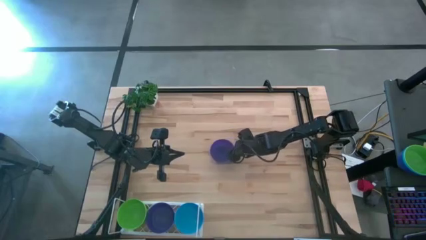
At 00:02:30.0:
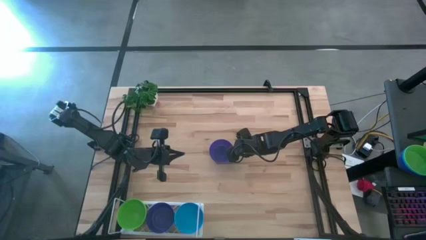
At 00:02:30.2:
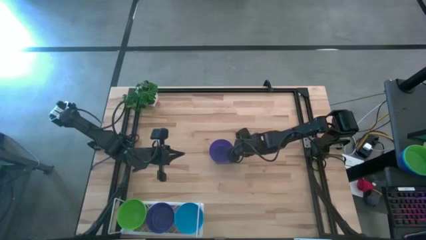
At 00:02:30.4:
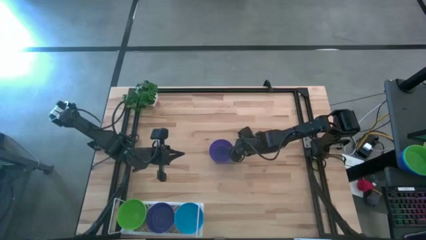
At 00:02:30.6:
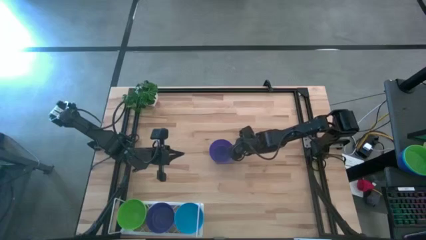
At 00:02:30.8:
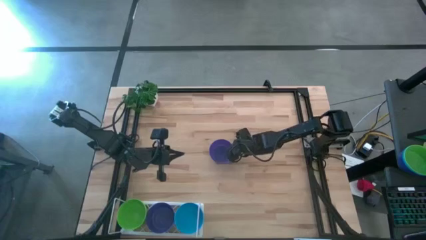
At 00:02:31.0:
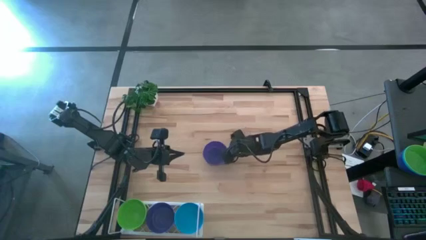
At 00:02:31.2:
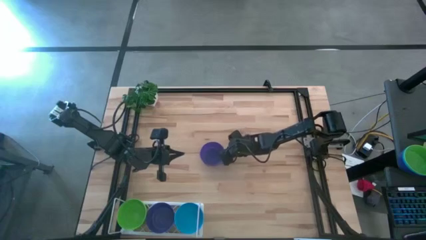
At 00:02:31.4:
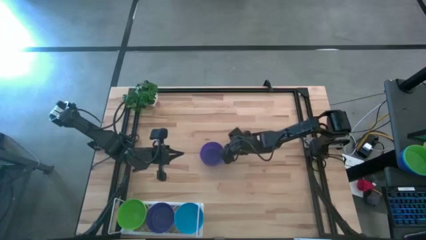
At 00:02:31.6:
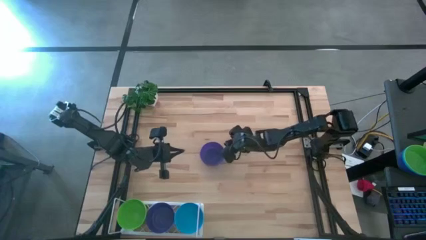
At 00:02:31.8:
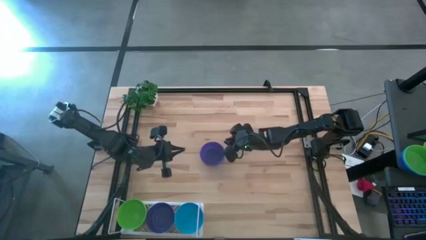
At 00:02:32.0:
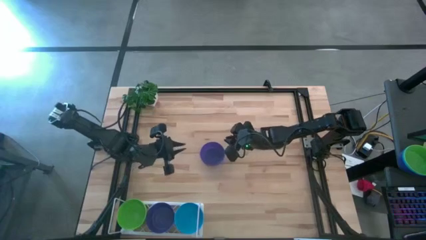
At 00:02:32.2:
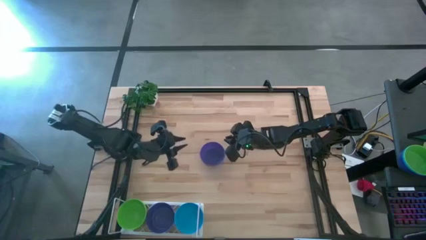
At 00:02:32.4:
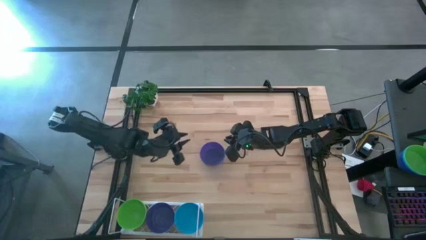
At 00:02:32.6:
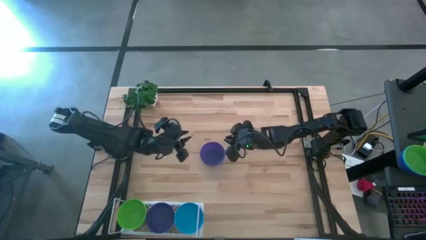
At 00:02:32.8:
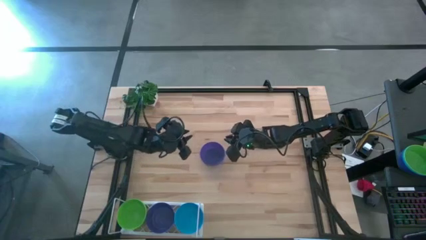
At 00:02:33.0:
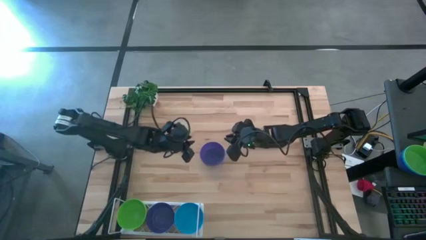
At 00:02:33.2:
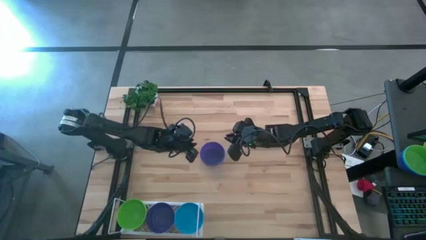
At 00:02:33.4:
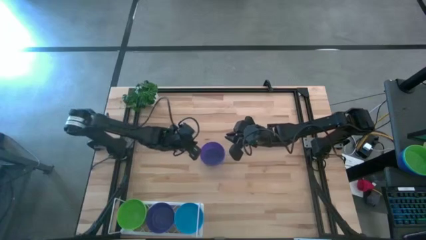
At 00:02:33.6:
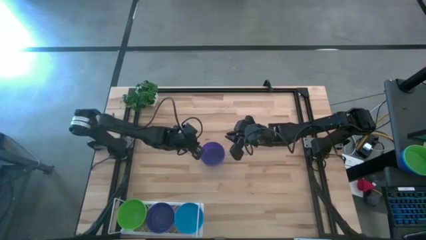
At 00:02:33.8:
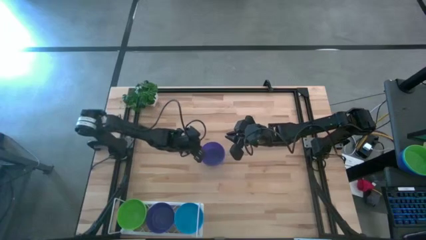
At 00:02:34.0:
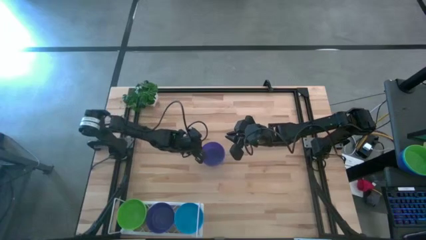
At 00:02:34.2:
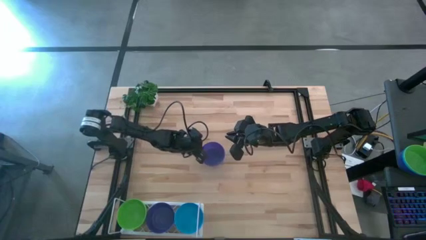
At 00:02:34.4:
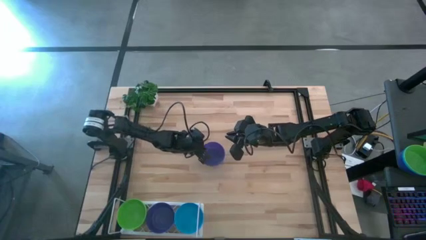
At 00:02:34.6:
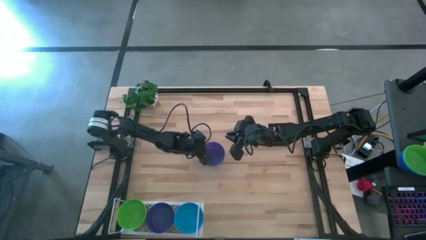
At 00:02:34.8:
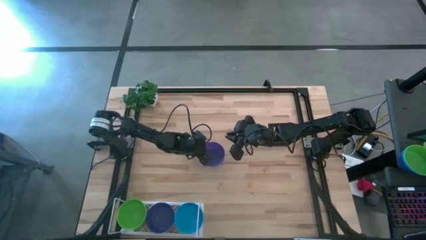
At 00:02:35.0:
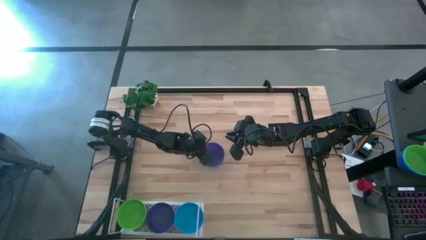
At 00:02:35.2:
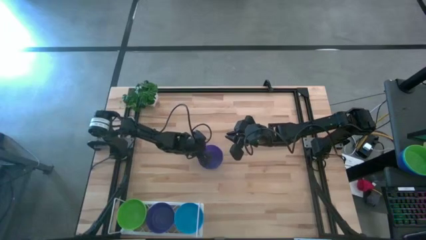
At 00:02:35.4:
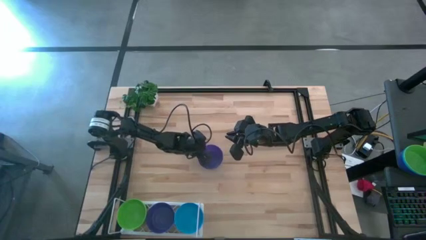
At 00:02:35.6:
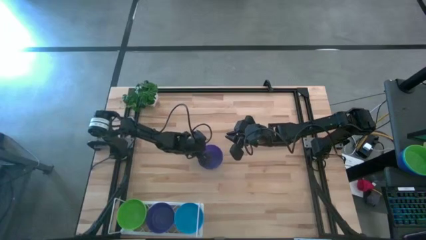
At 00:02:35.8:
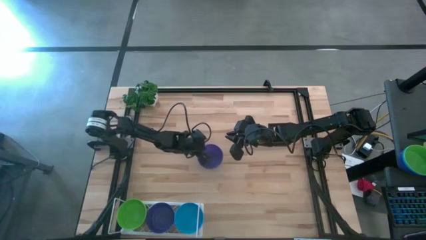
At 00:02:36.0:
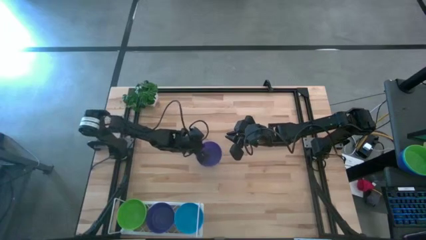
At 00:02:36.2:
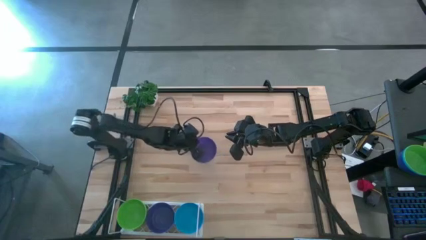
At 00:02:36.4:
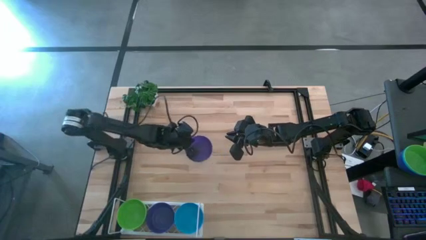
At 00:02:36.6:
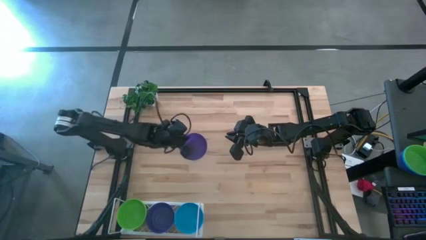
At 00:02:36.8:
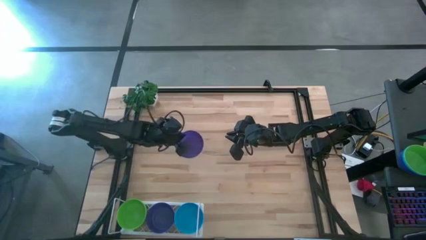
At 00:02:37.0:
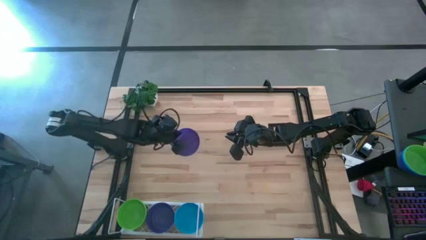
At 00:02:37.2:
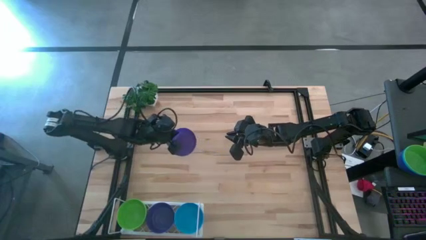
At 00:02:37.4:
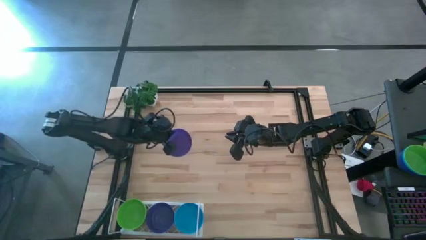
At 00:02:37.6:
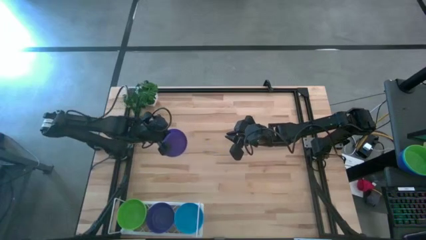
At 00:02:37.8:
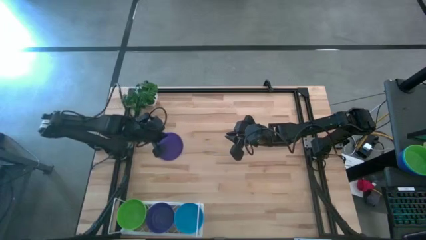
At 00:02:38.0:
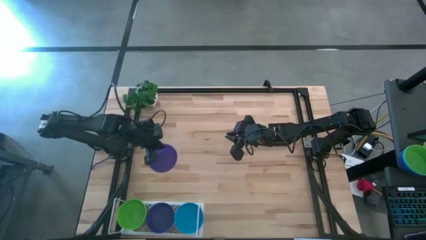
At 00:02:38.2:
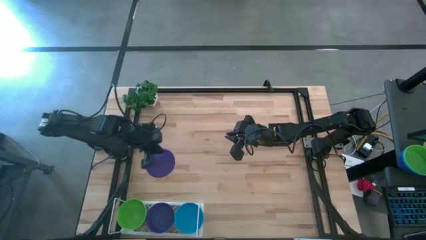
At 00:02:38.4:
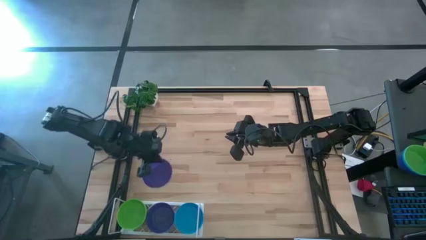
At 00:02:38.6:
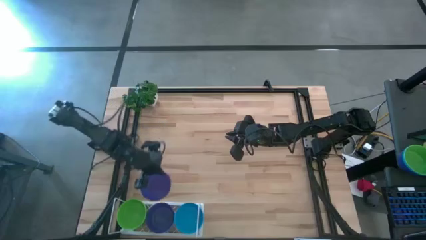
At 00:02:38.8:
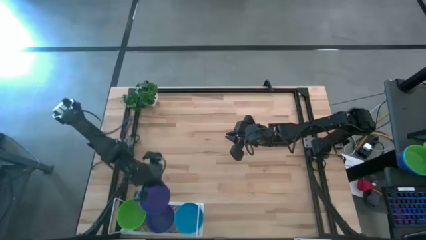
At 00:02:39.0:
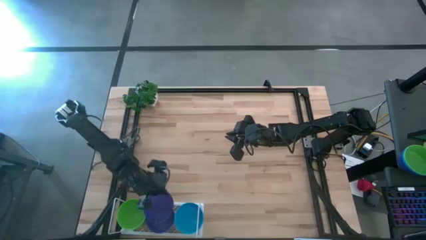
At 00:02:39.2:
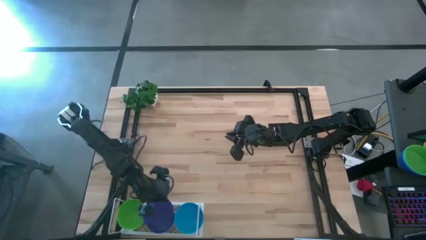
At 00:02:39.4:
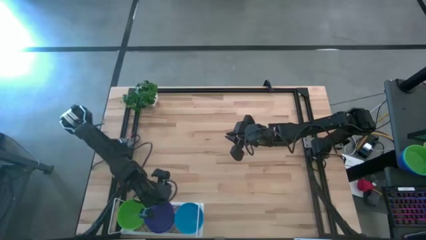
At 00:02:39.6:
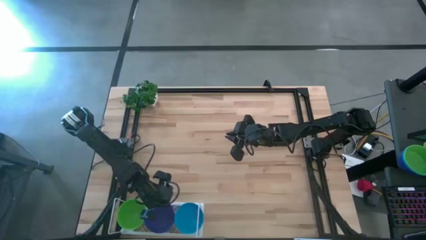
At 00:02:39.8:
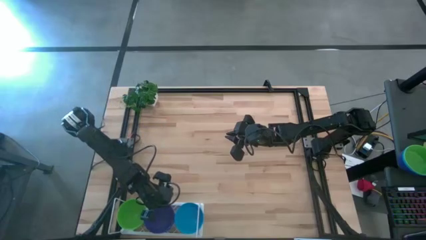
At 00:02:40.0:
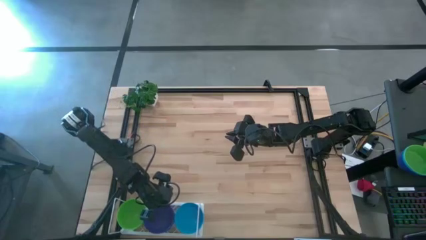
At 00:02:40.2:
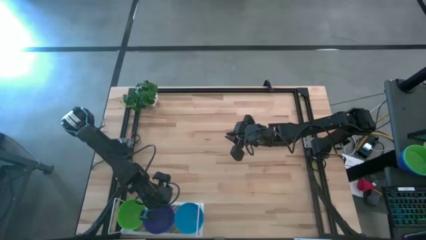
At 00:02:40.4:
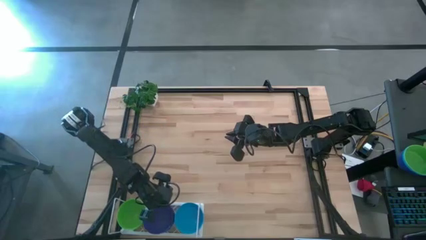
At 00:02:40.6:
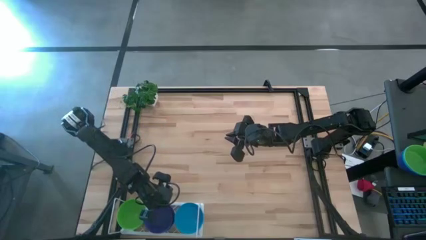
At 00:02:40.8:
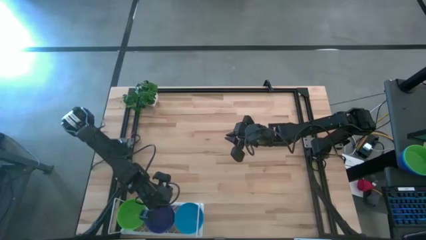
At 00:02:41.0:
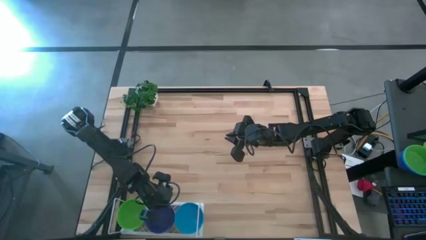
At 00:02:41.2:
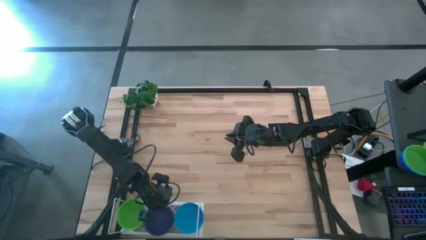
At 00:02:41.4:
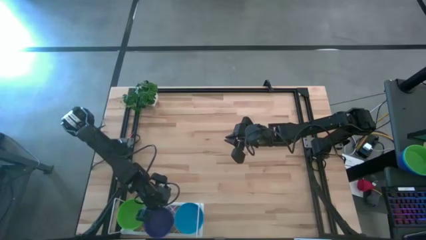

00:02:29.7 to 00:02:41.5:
Task: Pick & Place Mini bowls
Stack the purple bowl on the purple bowl on the shelf
